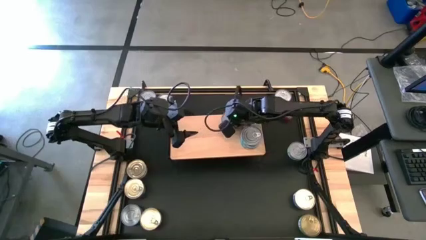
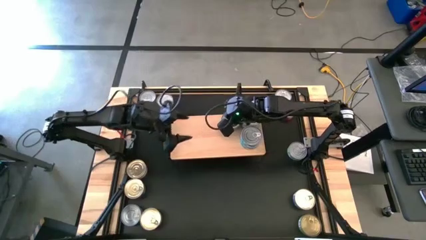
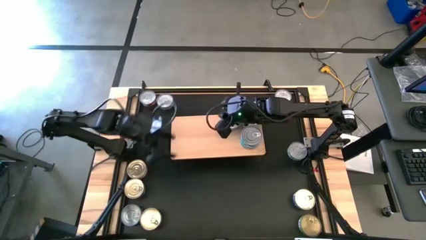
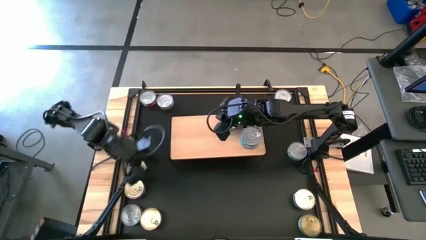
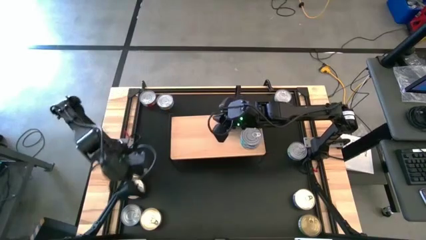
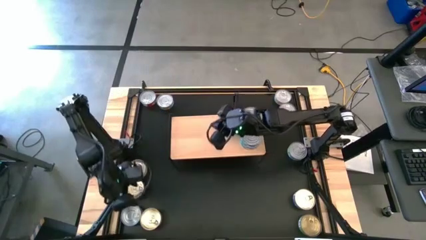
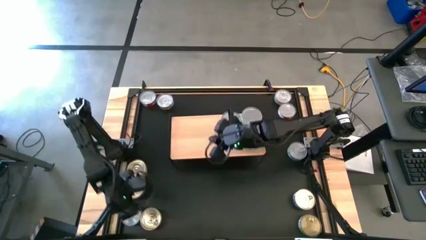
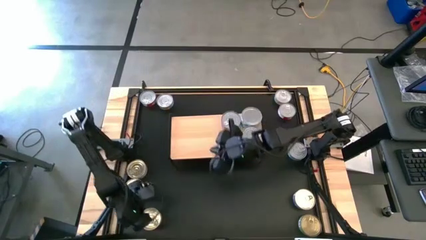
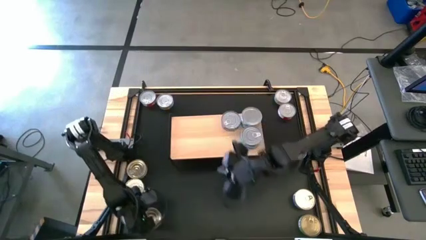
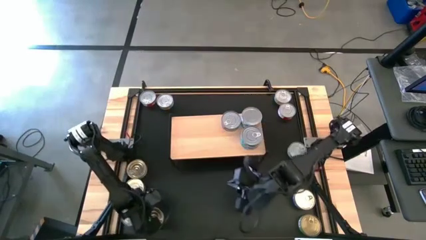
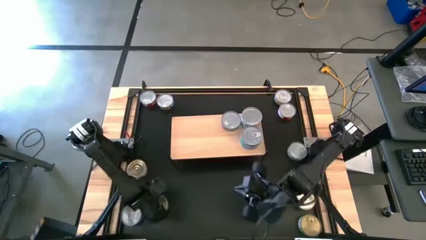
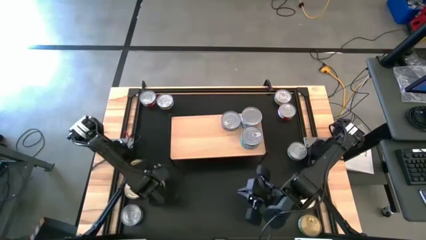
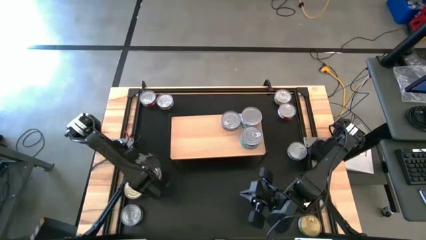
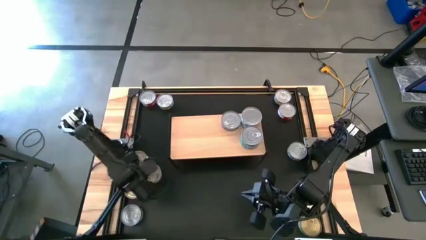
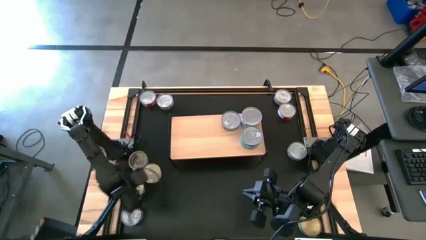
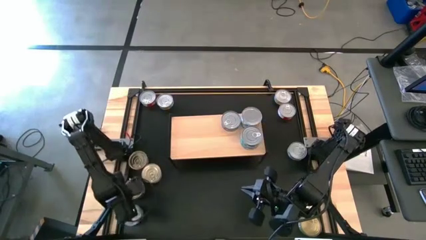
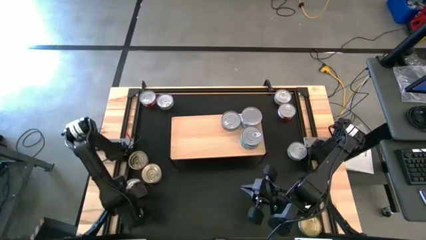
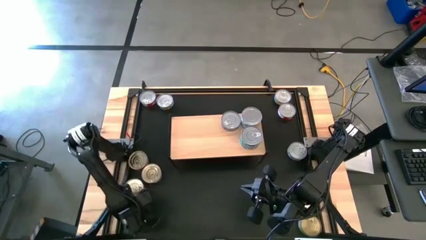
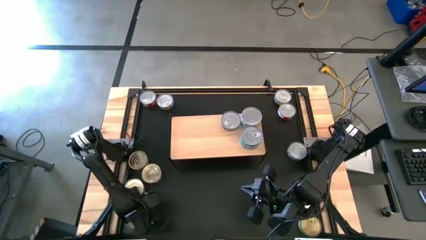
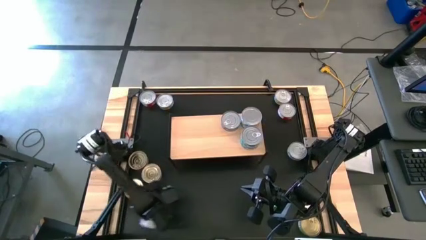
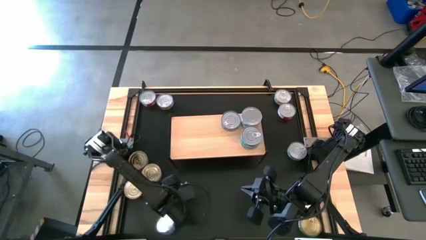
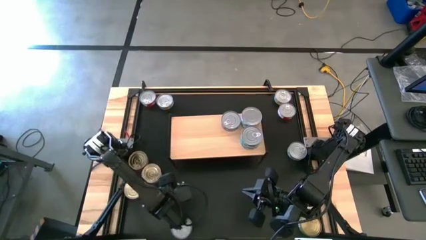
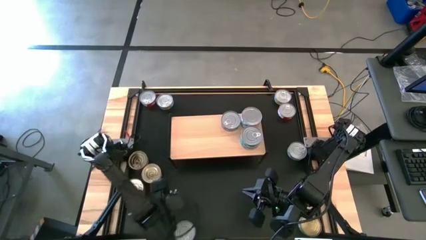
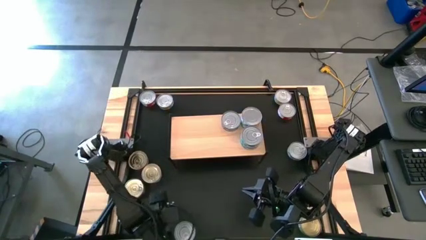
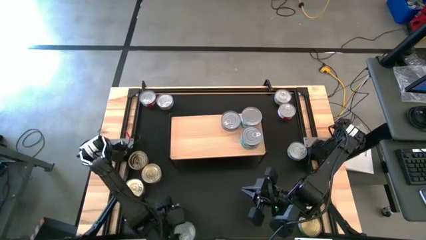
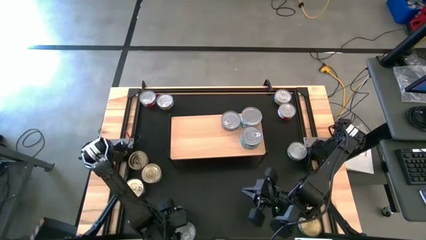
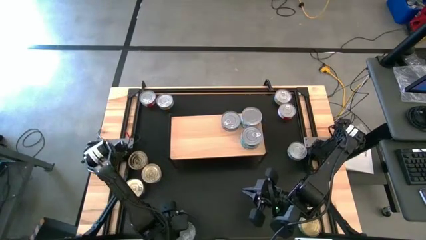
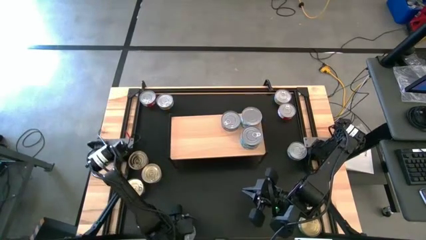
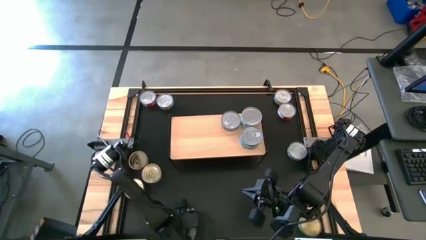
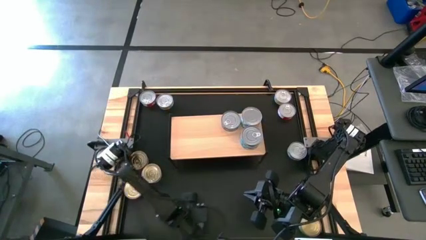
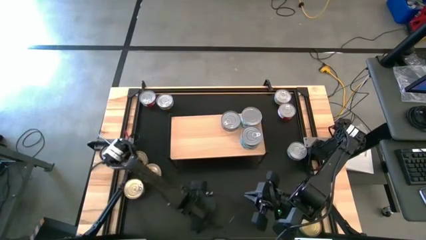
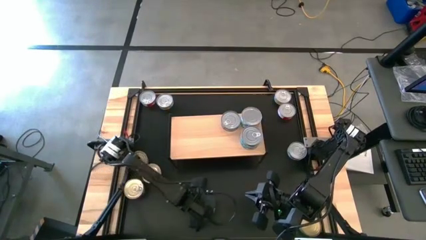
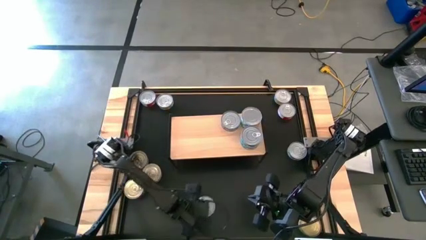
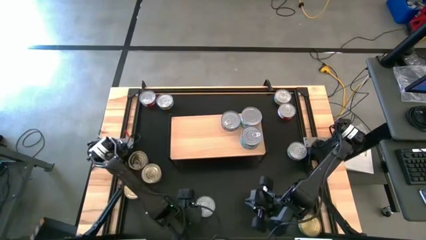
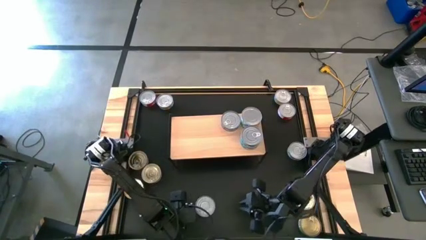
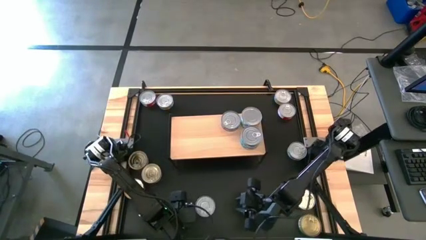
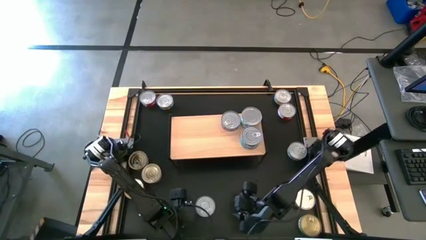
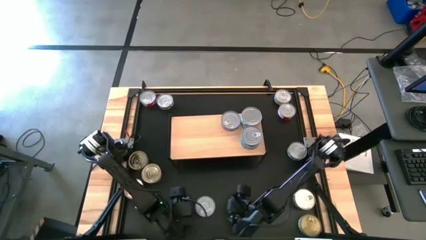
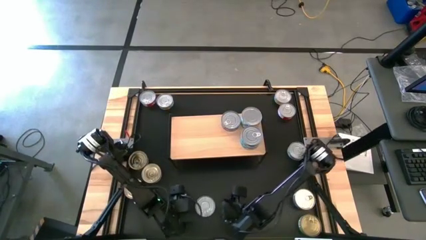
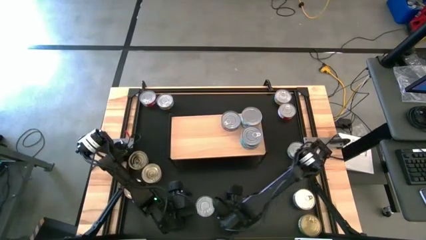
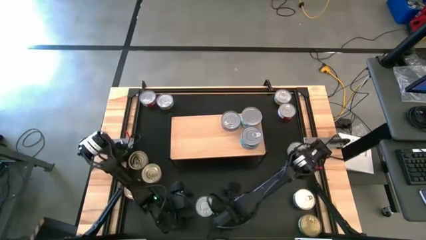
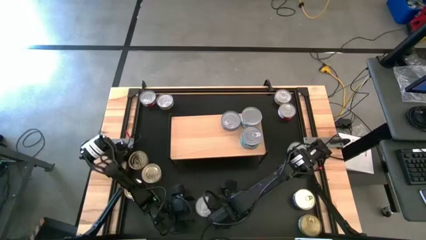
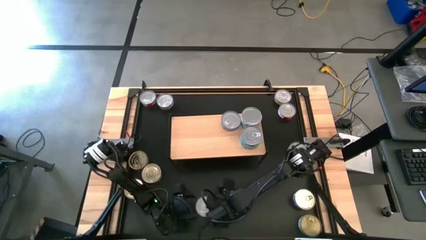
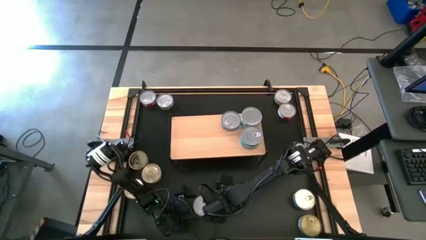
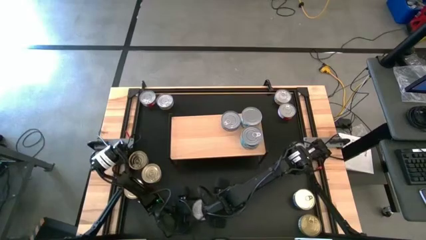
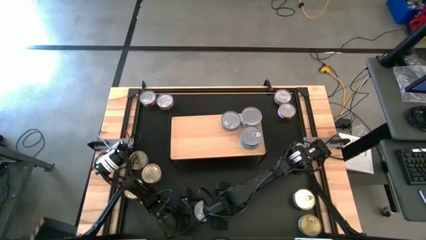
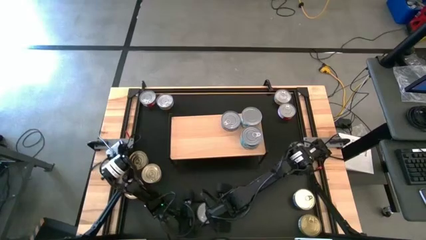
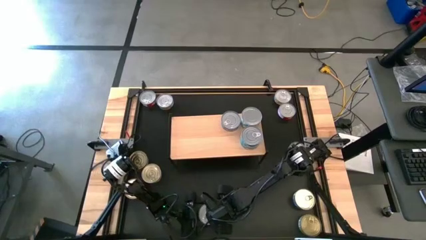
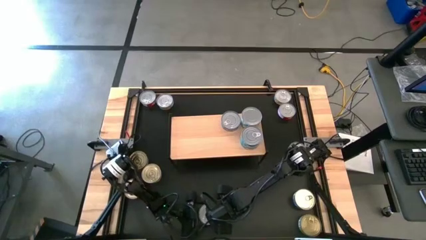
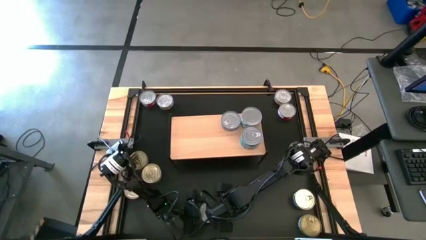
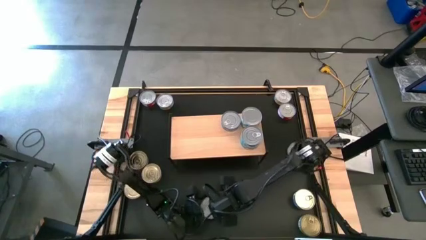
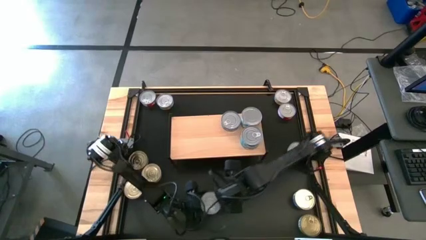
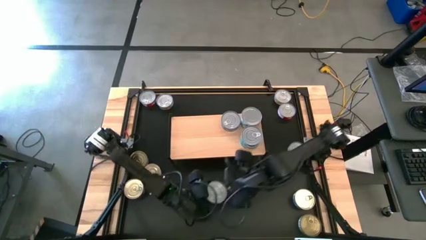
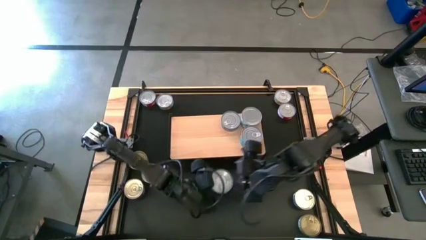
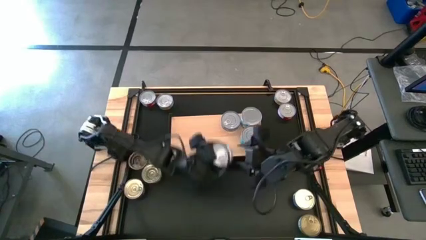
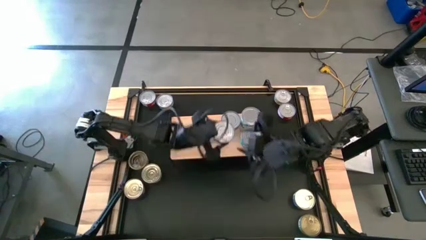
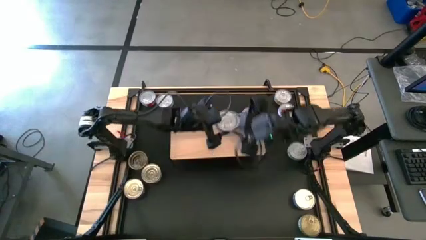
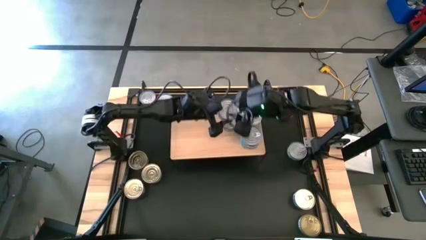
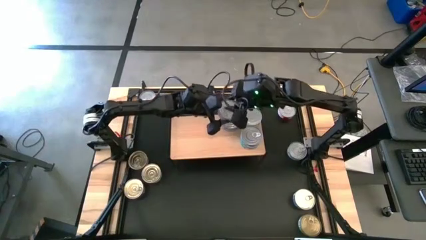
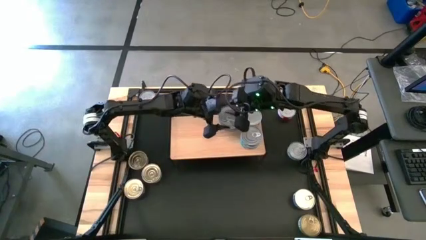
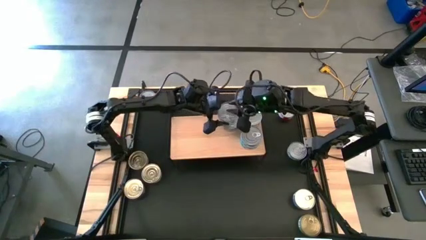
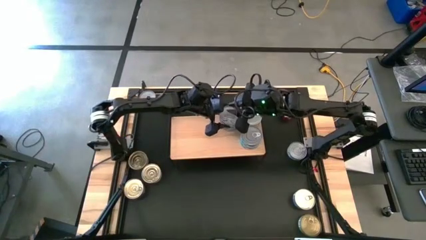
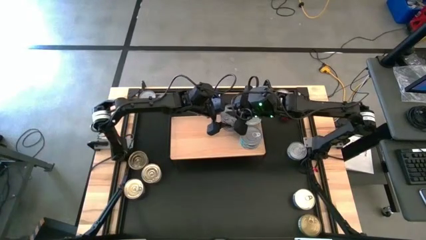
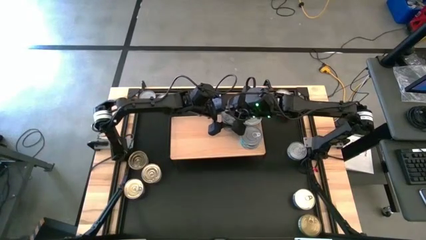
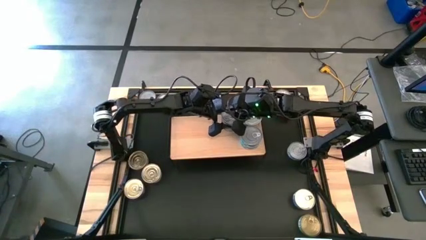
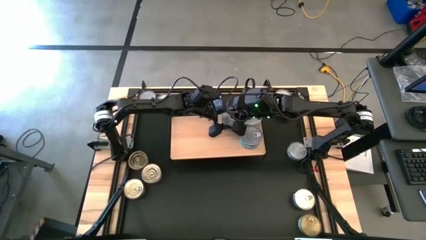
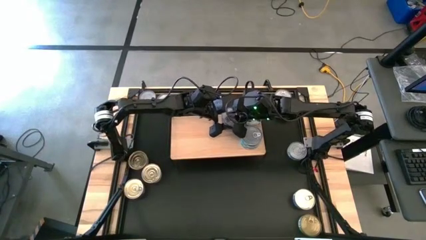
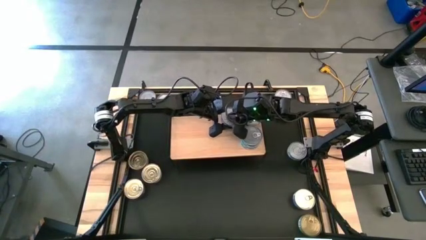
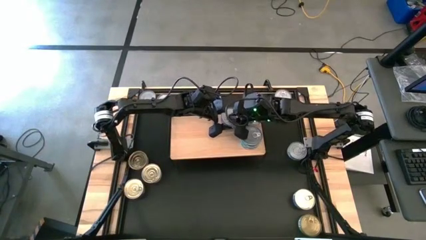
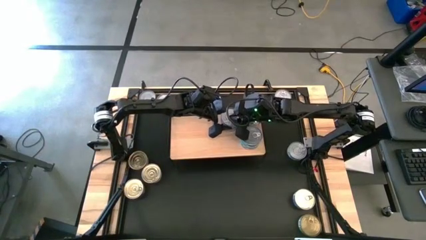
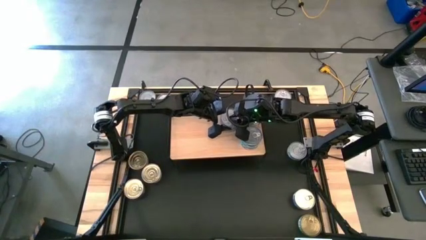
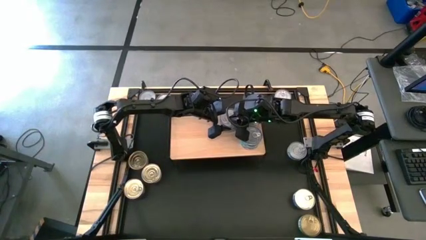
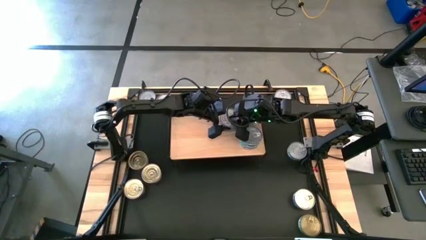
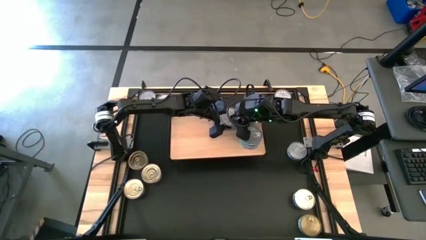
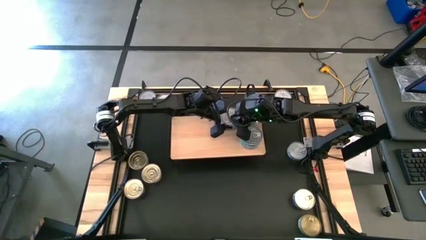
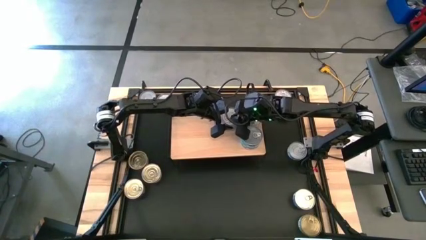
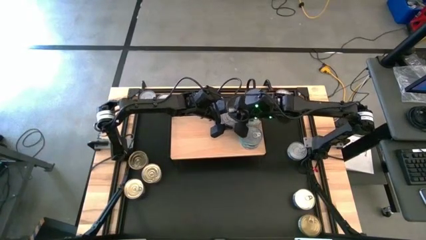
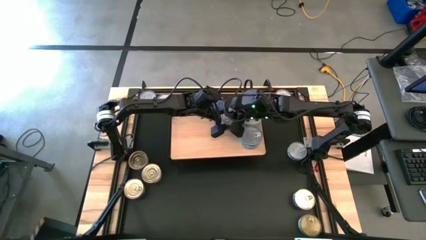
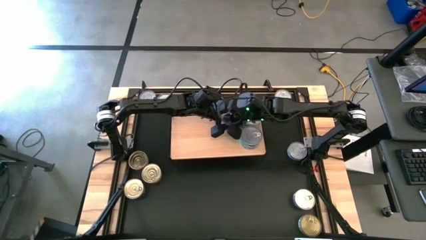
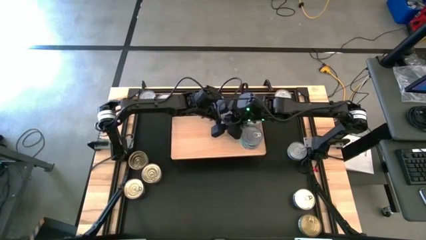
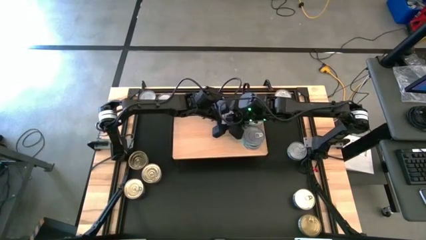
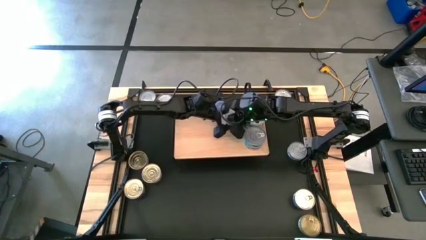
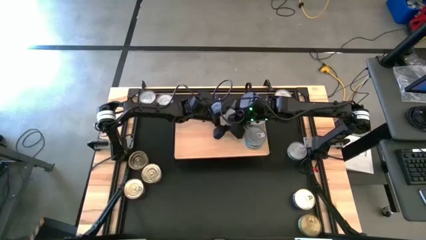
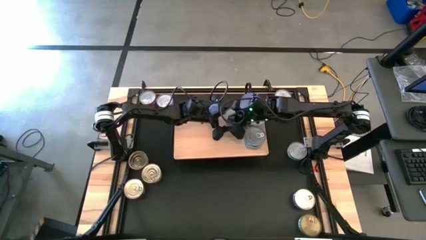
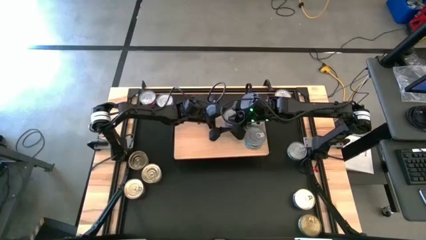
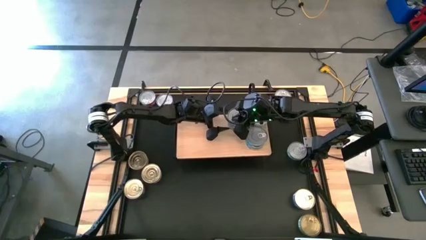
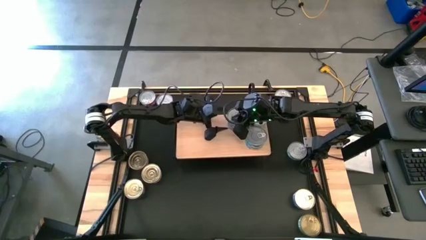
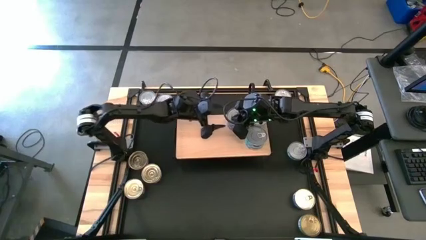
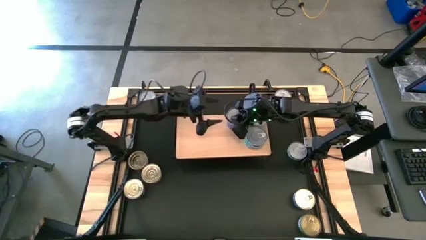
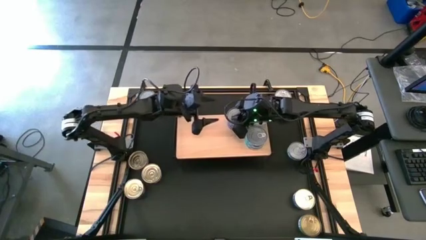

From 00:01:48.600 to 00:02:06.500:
Task: Stack canned seafood by type on shelf
Stack the blue tuna can on top of the blue tuna can on the shelf
